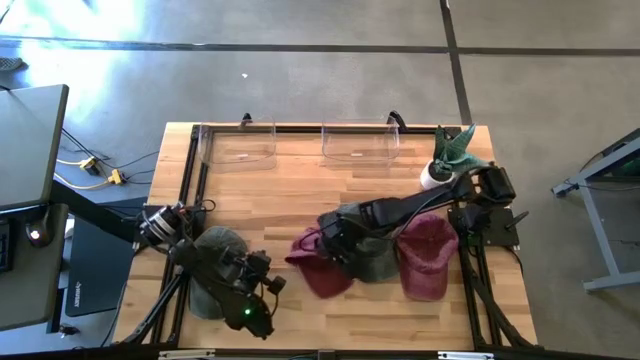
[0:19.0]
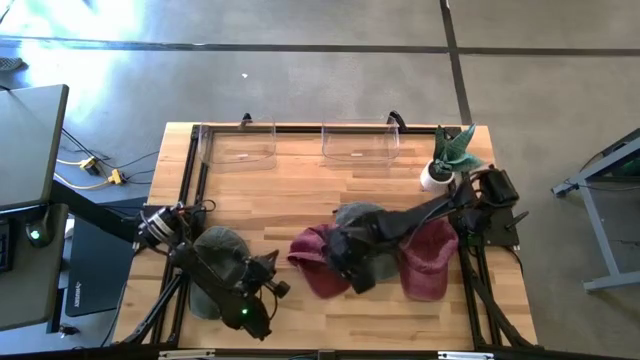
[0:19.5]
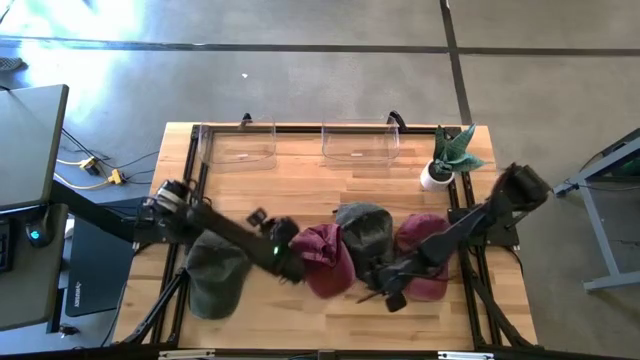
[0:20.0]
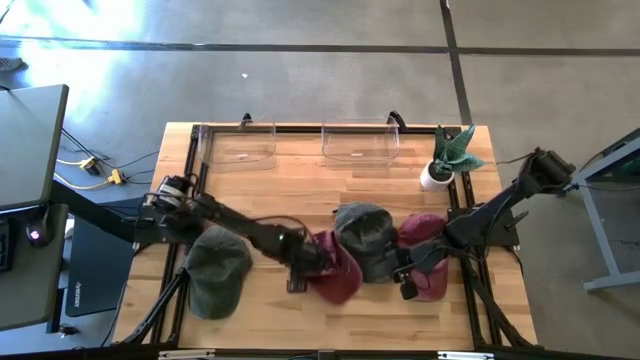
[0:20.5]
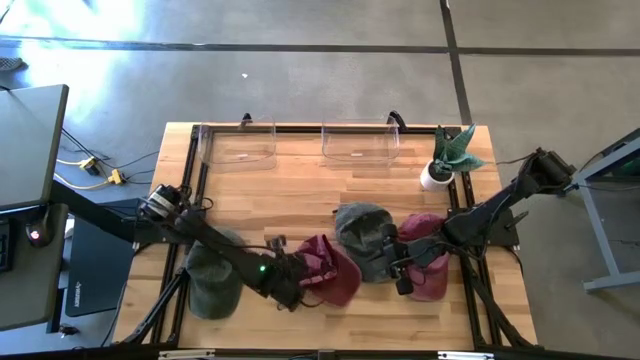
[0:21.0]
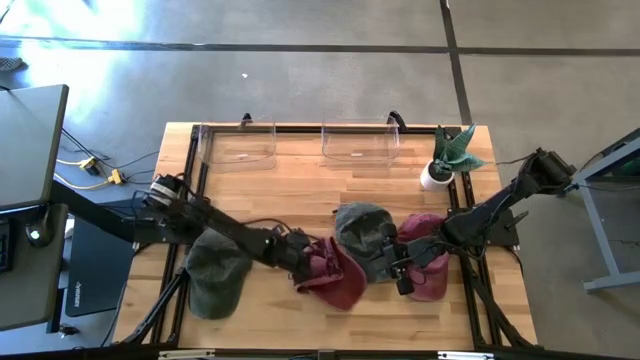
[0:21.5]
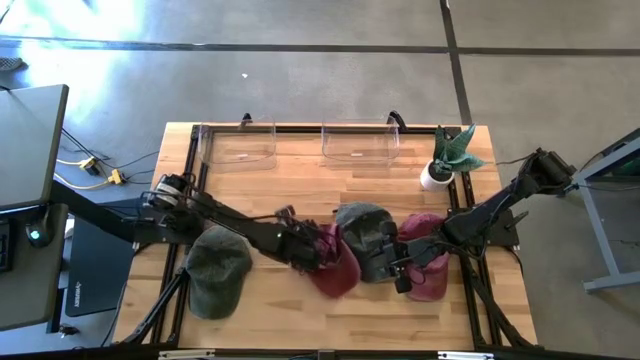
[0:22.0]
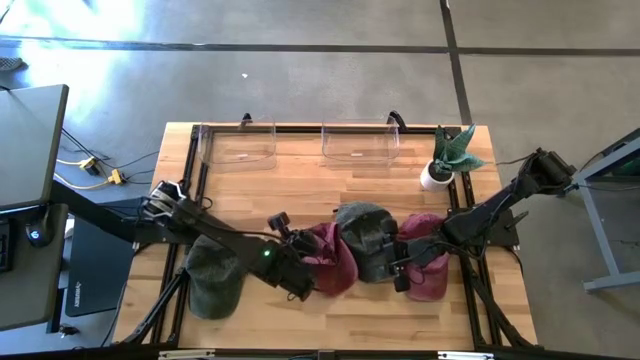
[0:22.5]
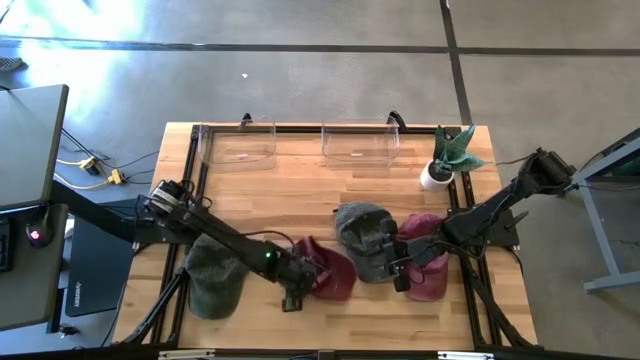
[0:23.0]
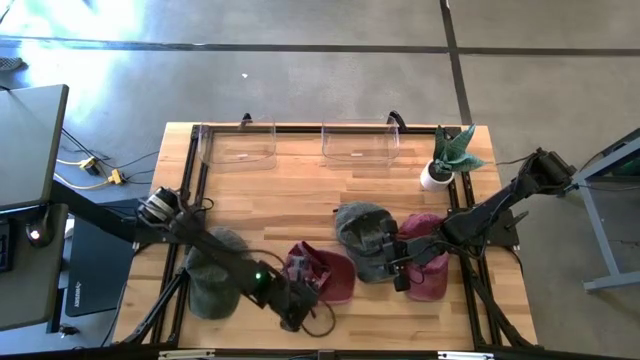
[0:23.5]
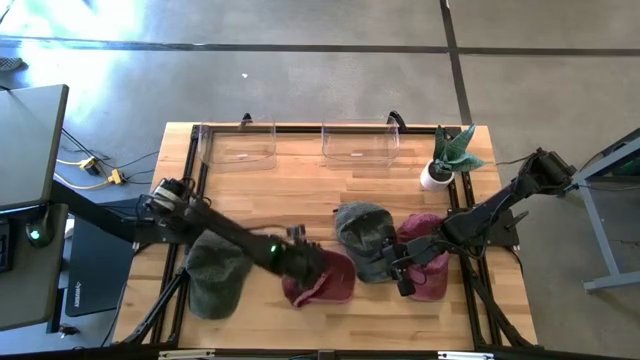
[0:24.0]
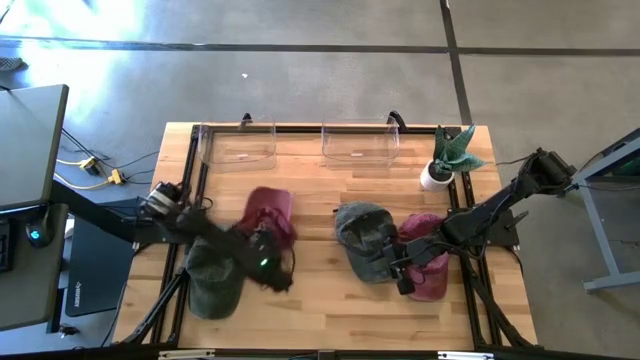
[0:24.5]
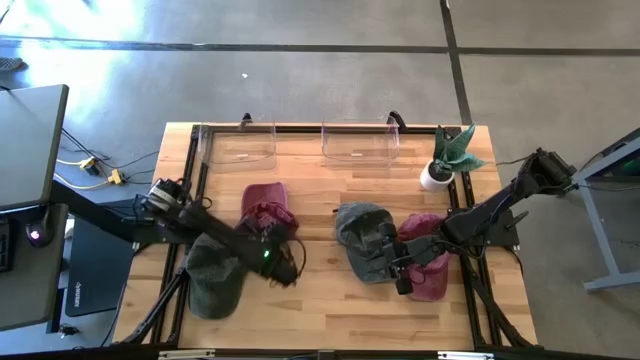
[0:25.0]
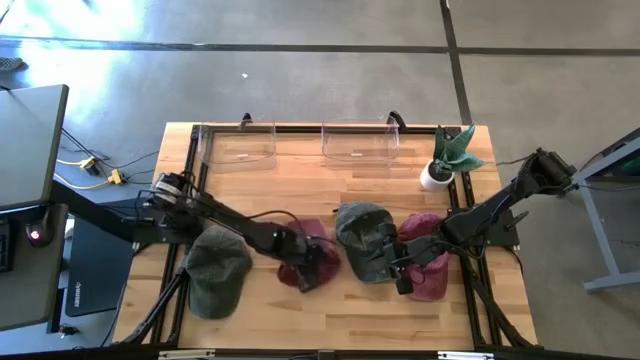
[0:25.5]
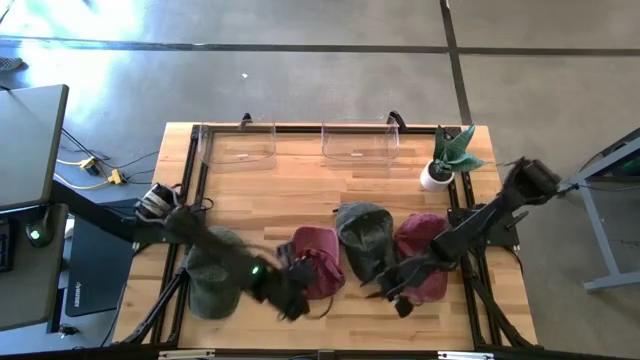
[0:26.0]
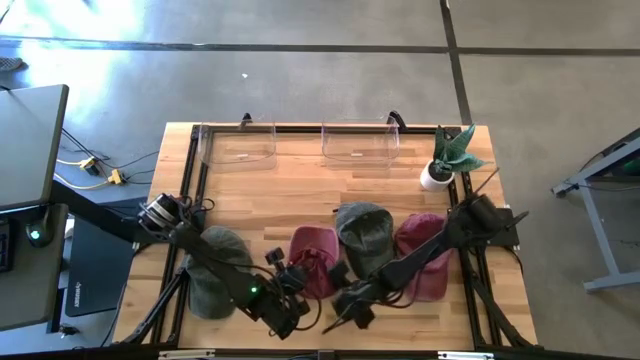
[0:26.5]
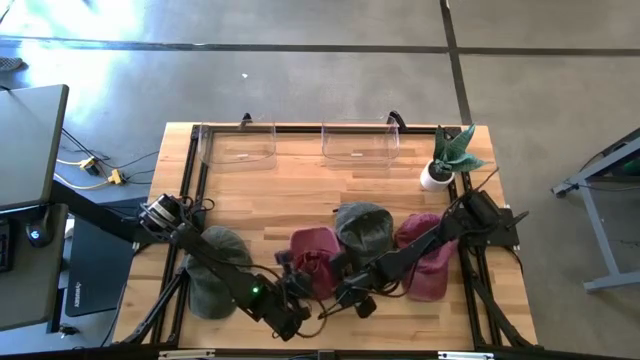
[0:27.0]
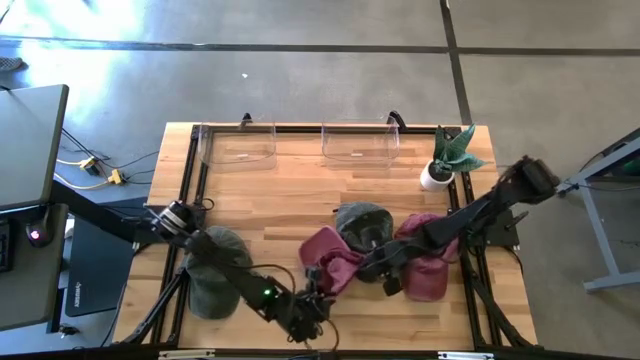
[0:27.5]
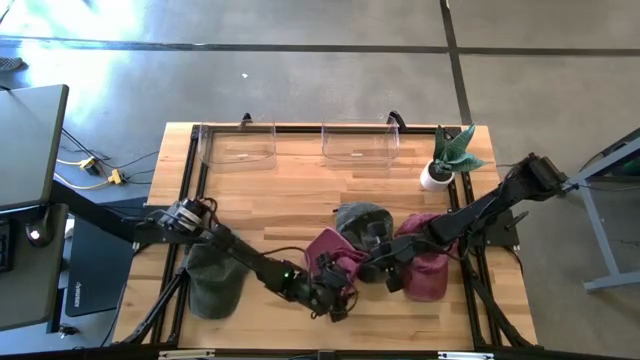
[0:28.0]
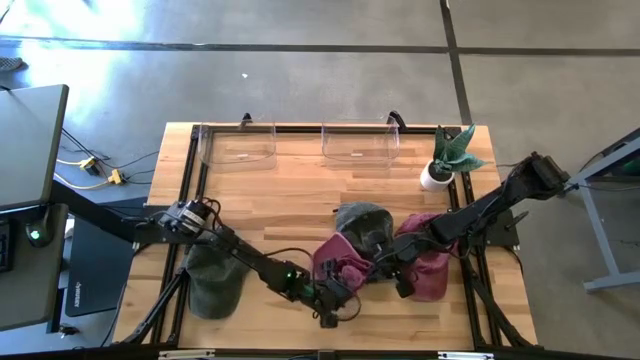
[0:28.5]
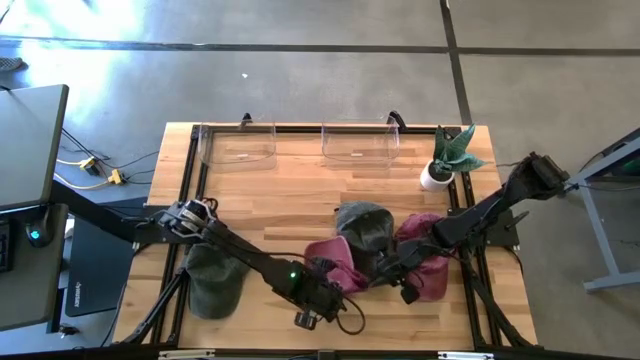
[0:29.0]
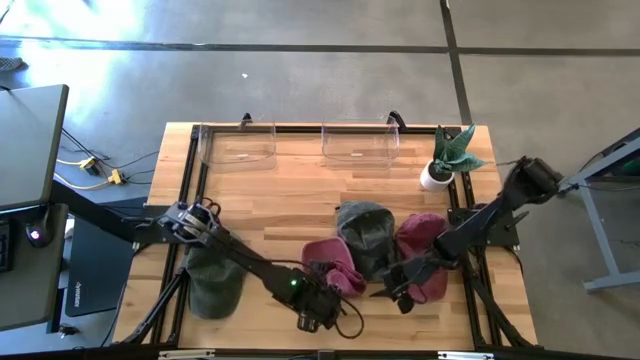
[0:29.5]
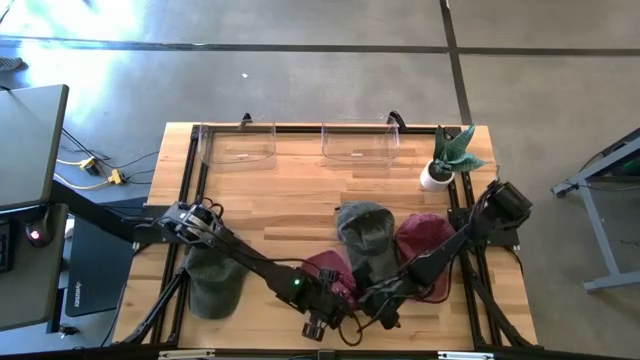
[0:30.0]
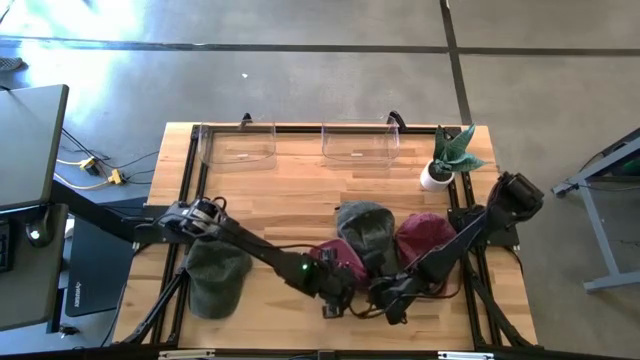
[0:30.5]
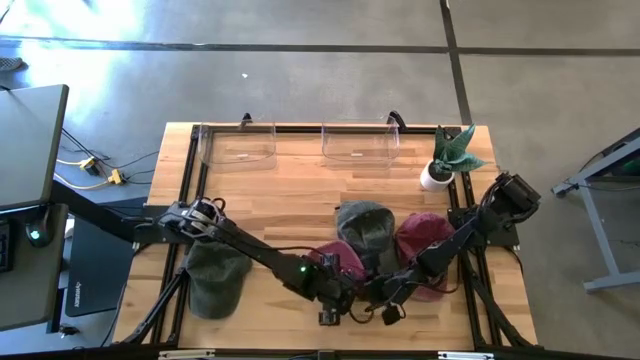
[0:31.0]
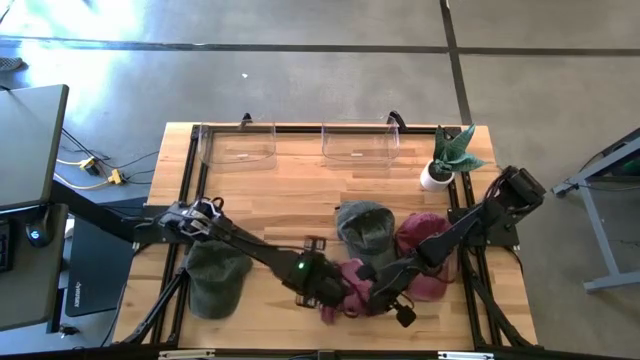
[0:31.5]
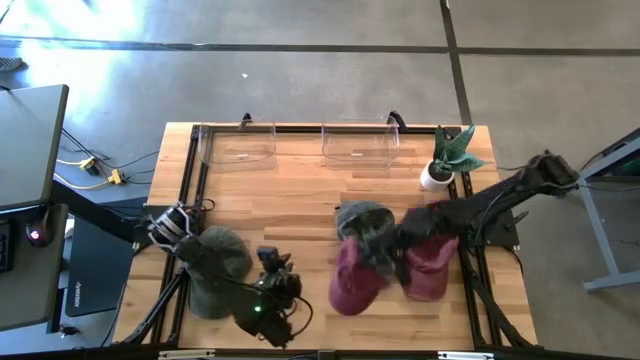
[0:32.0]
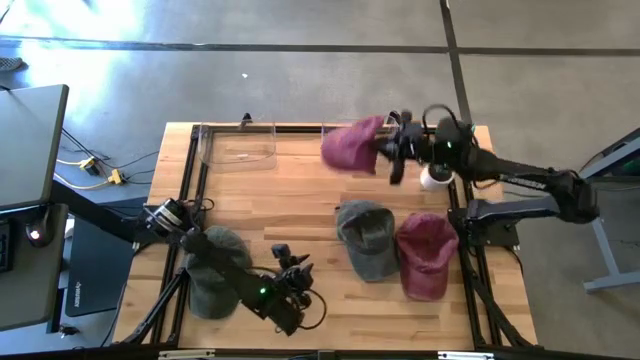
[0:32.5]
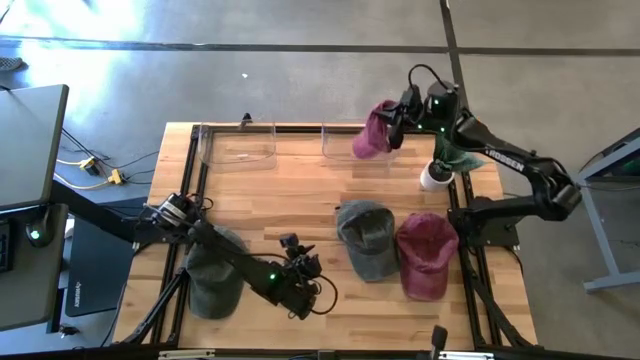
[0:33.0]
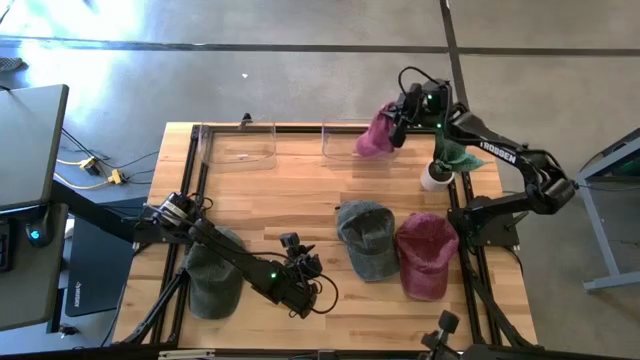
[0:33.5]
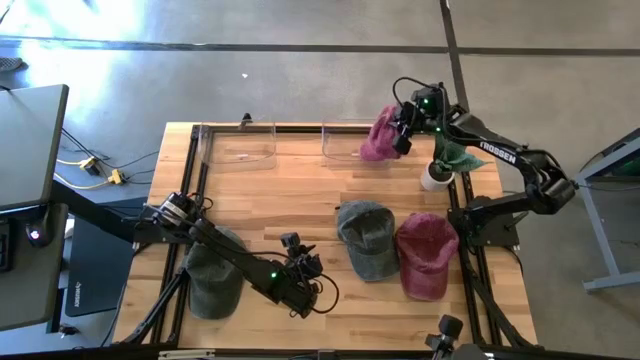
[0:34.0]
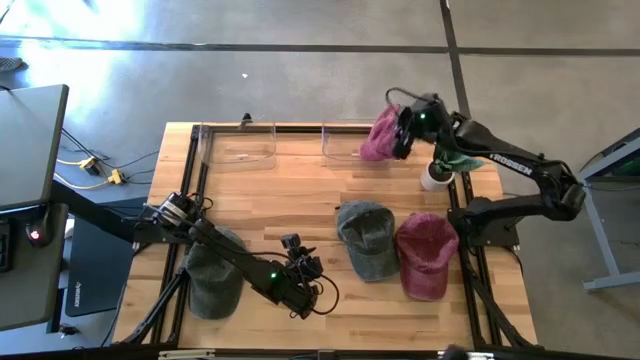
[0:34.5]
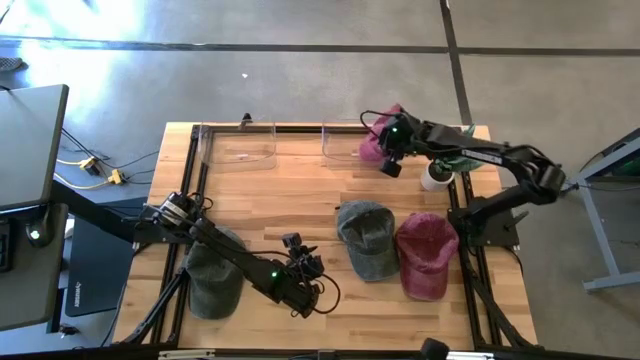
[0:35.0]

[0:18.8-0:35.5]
Task: Pick & Place hat
Put the left red cap into the right transparent bin

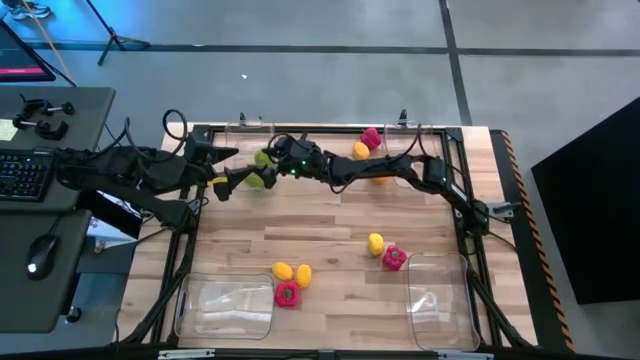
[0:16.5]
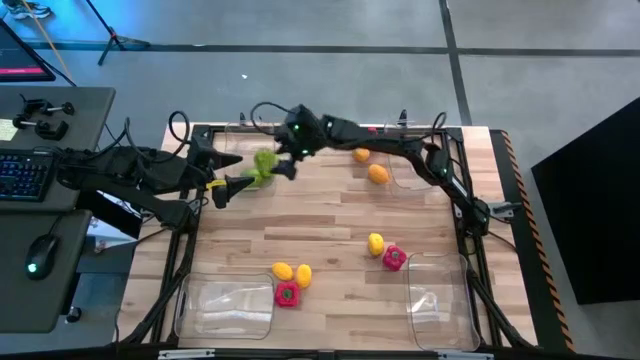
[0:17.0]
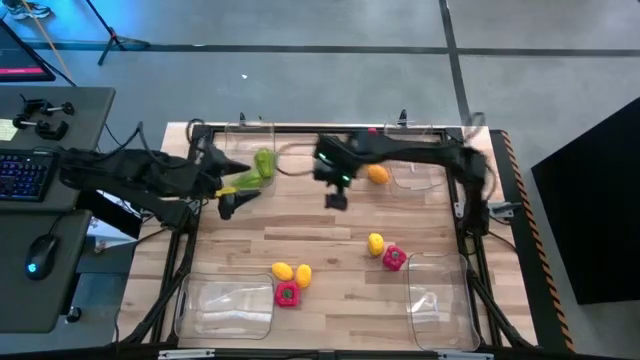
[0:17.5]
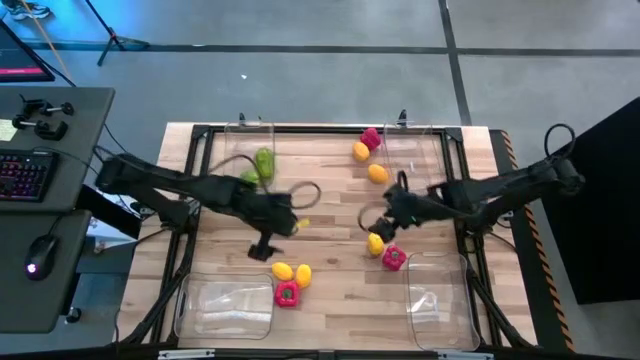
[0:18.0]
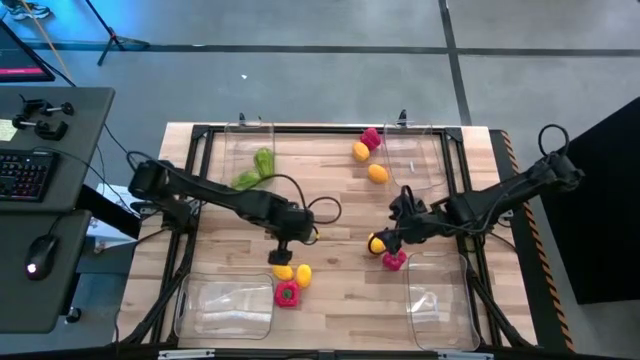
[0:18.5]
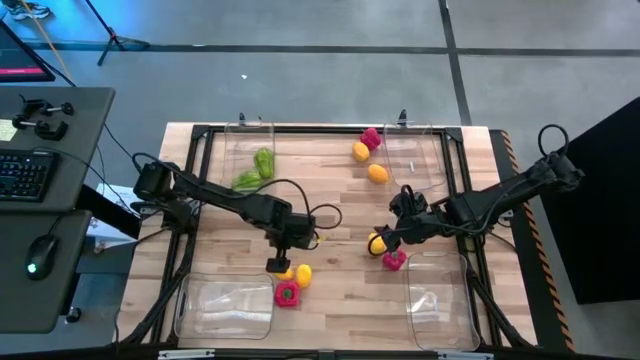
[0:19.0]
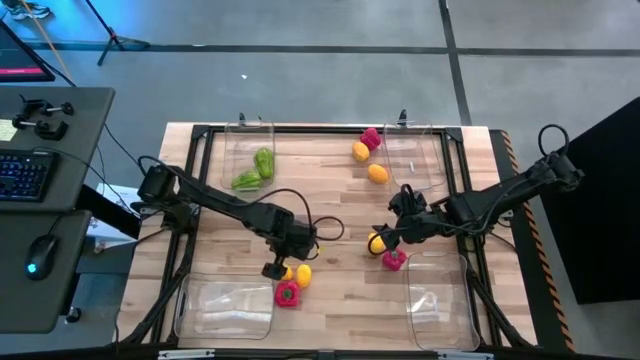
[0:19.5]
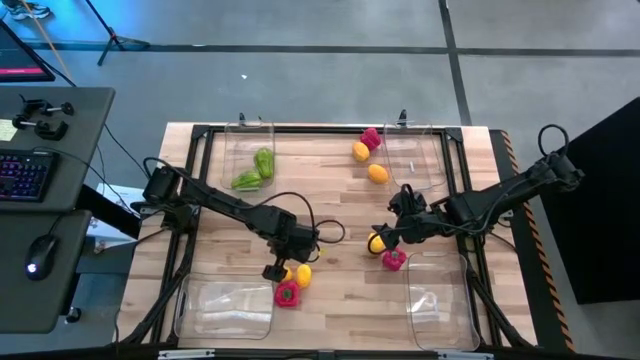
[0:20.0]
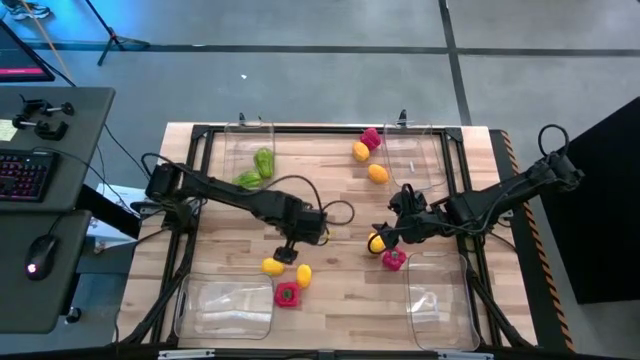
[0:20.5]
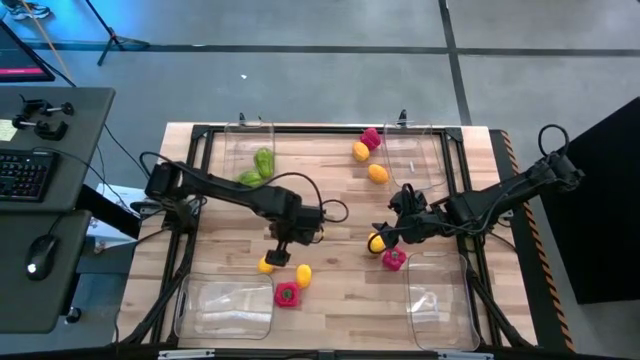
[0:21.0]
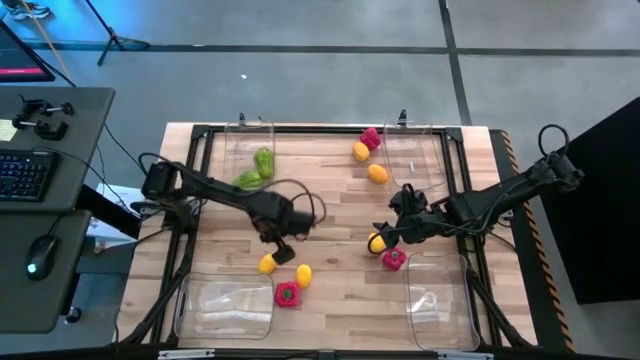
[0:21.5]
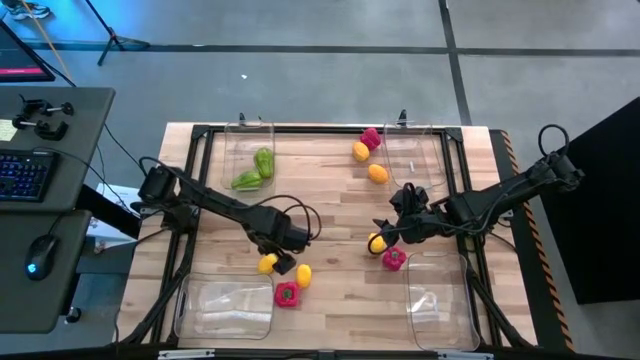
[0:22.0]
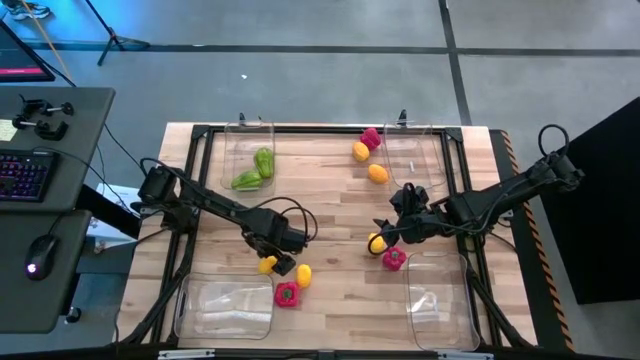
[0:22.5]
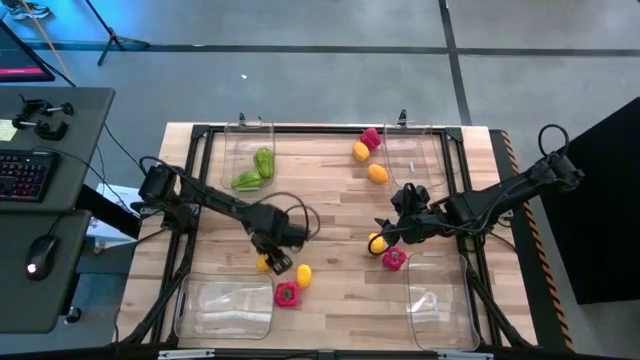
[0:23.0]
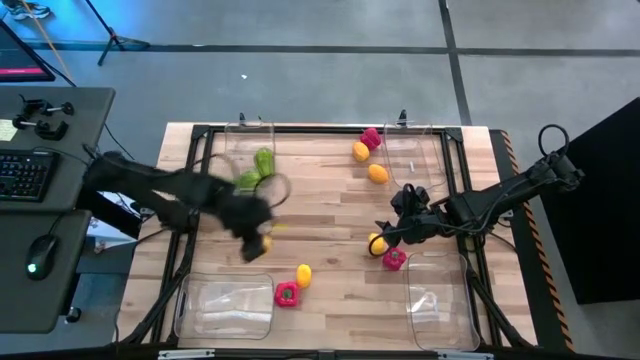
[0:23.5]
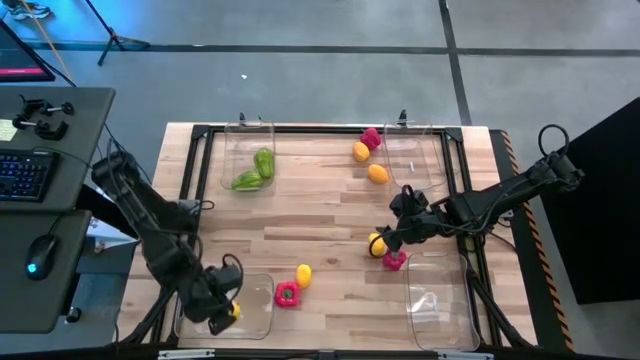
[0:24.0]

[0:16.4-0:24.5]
Task: Sort produce into baskets
Put the lemon into the bottom left transparent bin
